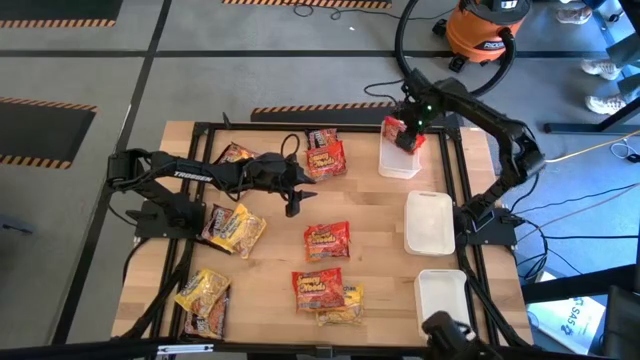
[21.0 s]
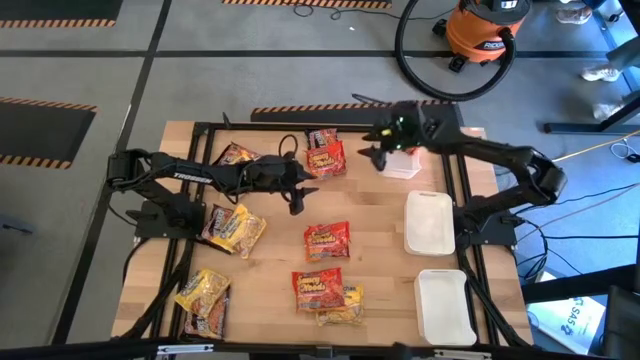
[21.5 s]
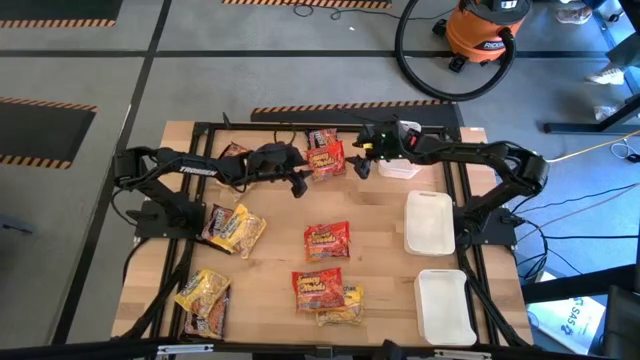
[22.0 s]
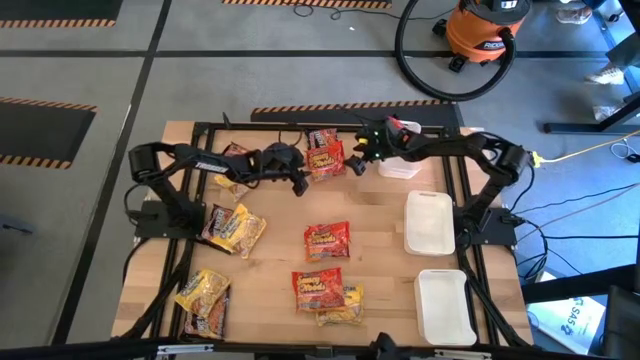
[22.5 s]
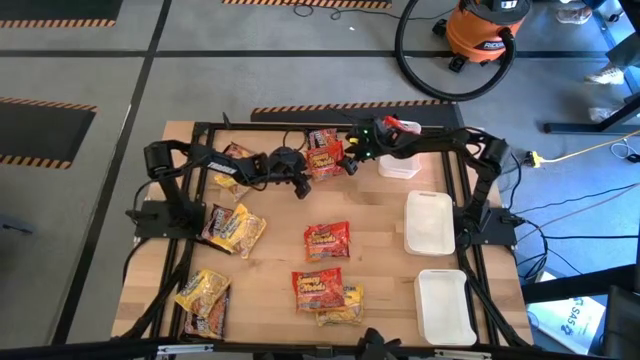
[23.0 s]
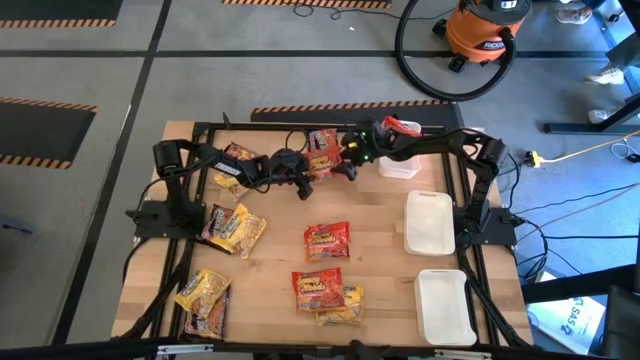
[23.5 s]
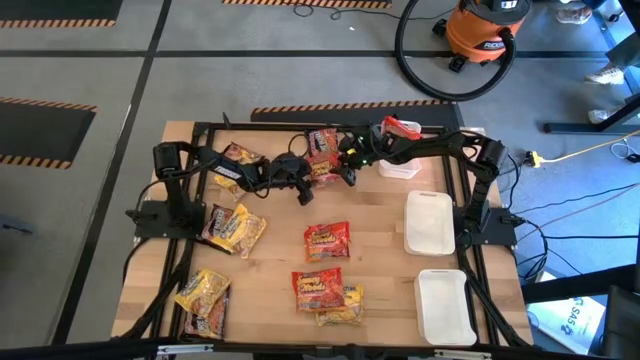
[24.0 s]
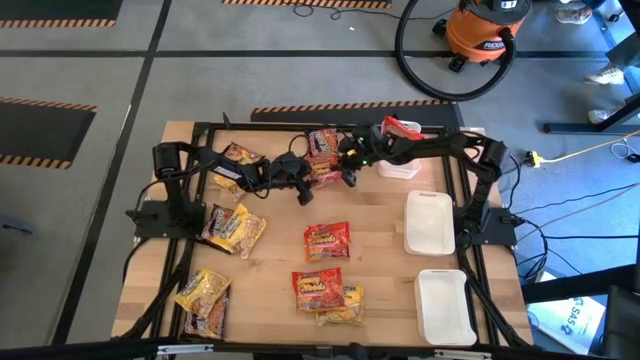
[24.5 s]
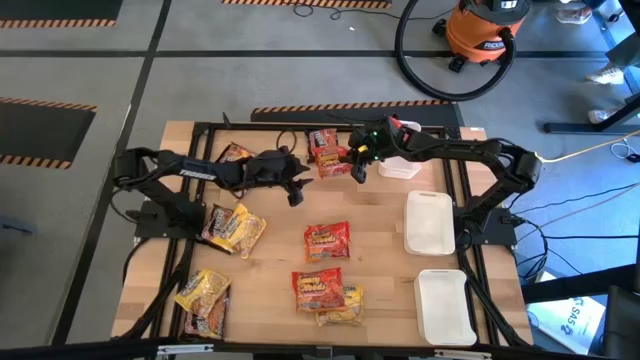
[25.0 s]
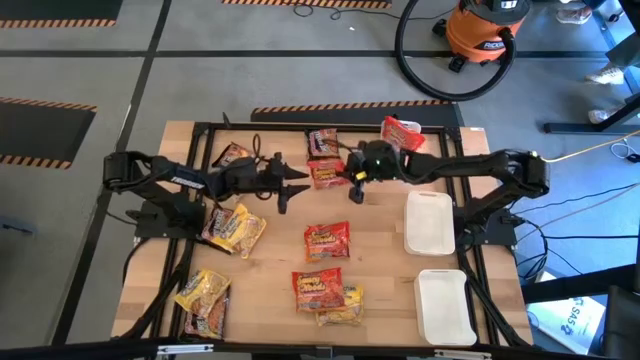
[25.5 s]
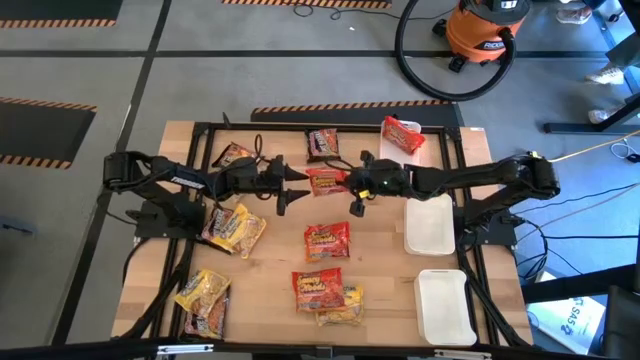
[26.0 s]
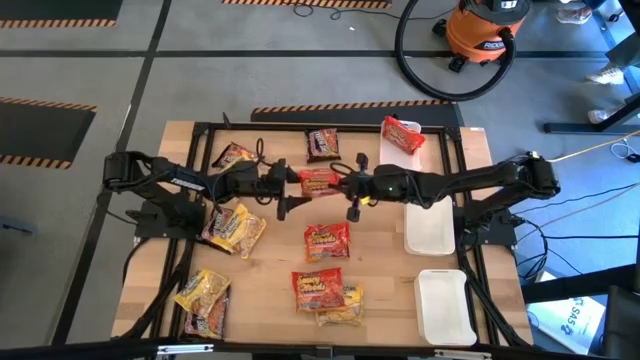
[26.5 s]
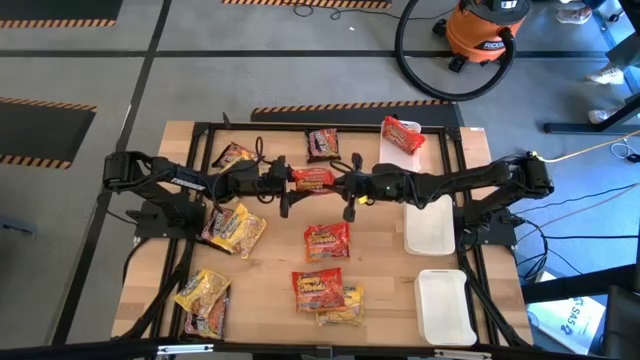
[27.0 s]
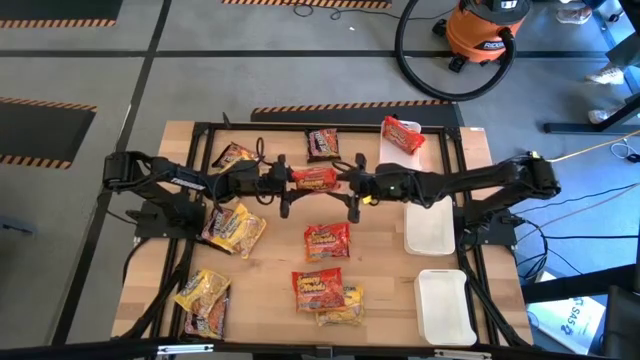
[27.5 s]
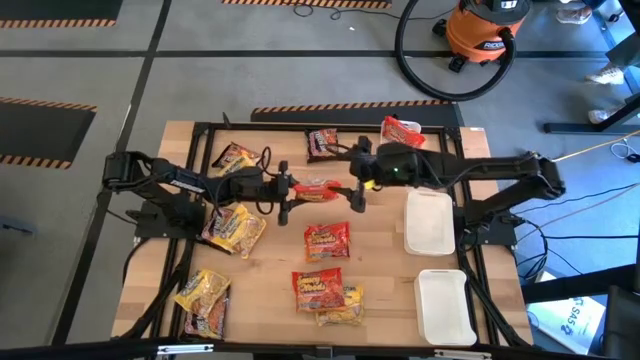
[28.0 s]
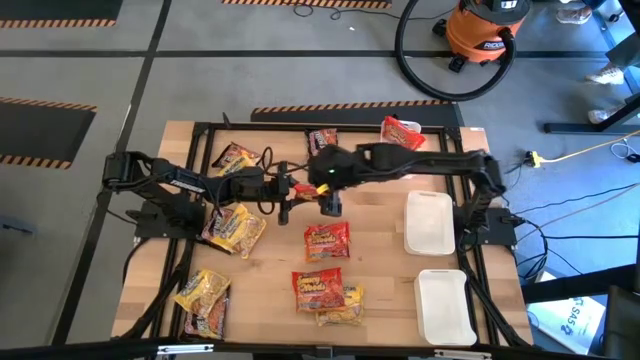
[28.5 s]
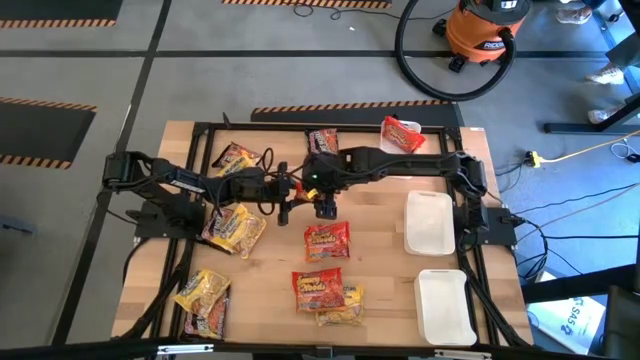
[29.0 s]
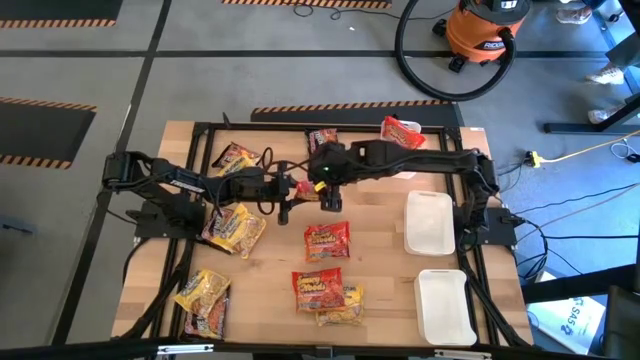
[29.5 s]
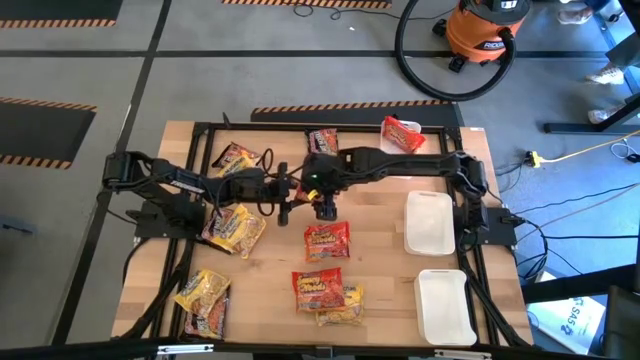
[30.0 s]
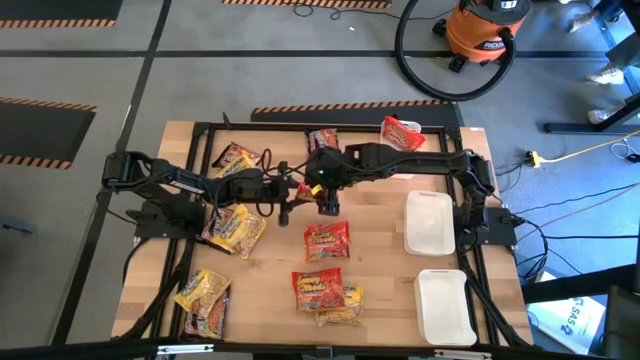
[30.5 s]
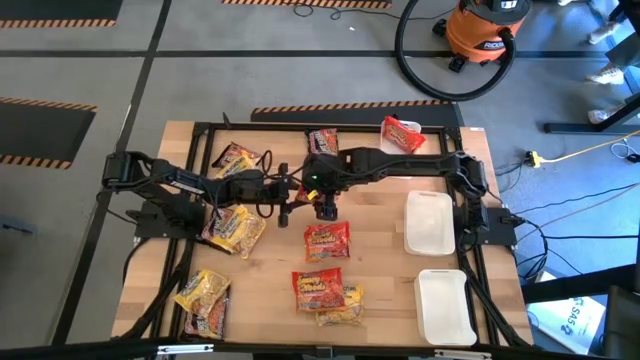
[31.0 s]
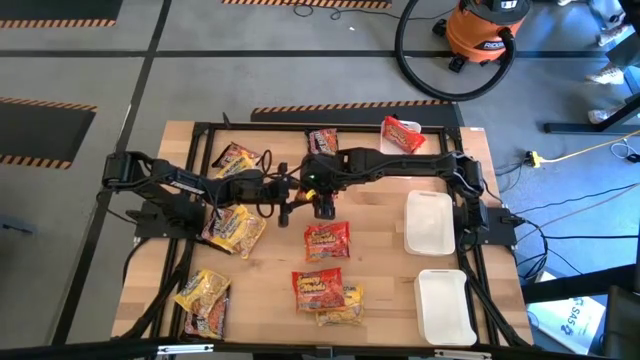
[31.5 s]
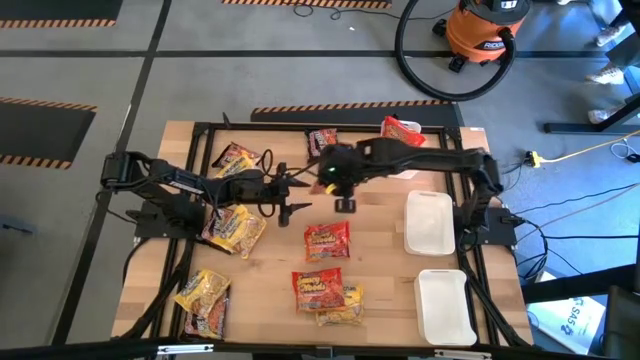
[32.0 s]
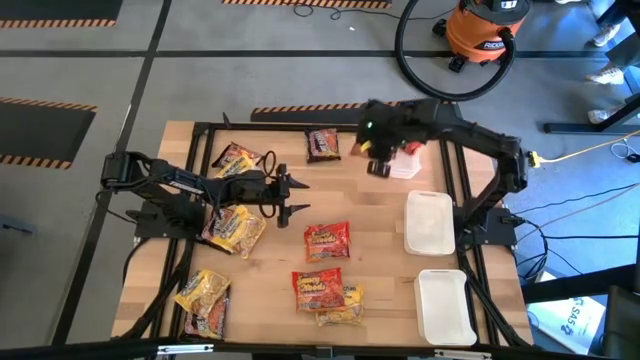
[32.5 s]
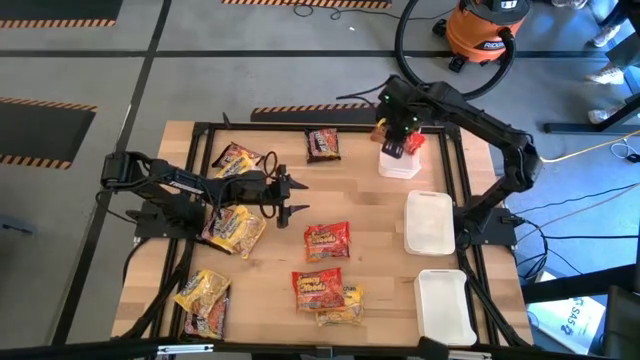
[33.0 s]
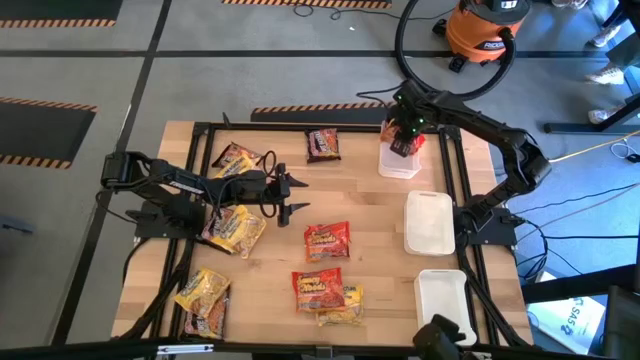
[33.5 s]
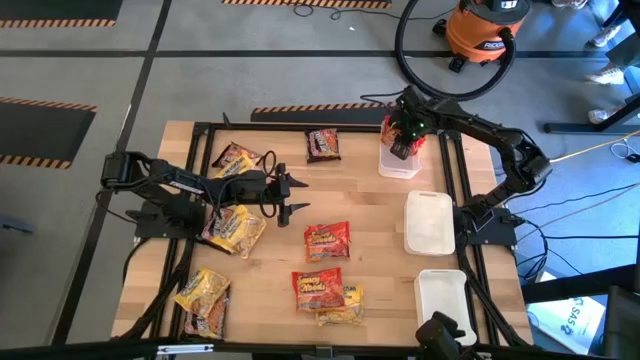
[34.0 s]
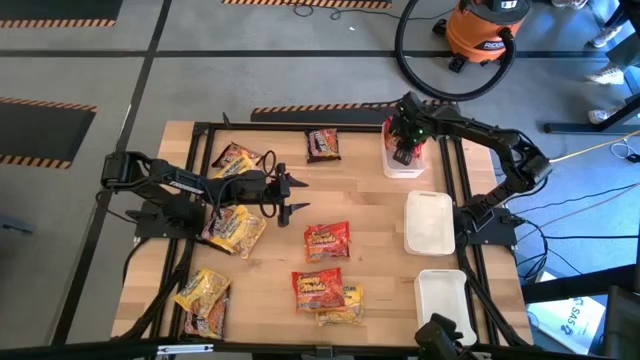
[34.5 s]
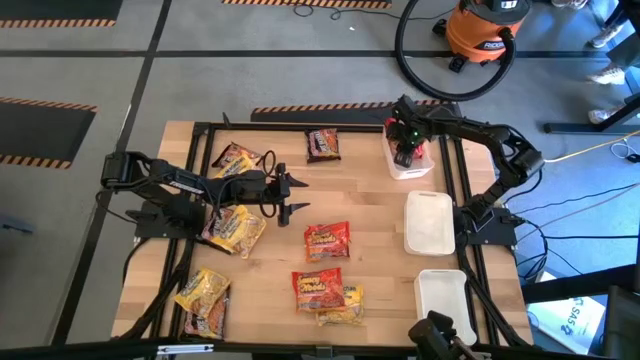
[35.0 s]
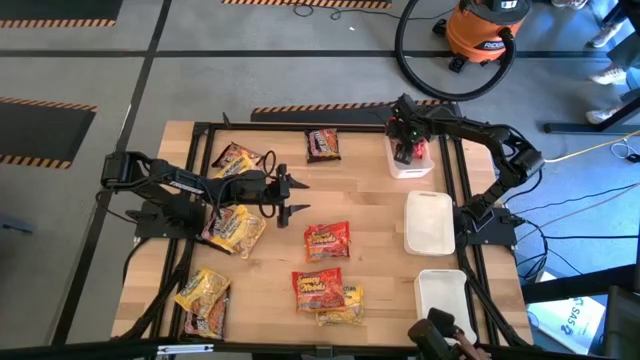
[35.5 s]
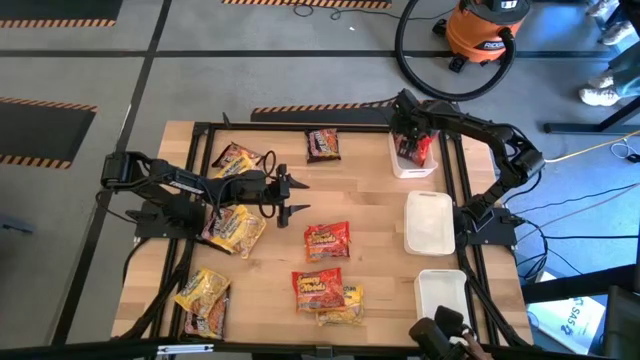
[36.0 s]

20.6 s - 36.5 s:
Task: Sort Maruchan noodles
Put the orange noodle pack into the top white bin

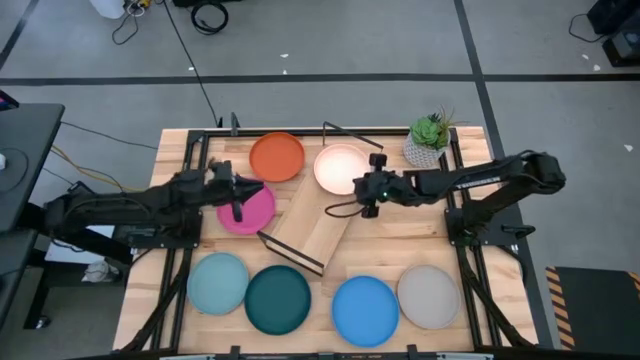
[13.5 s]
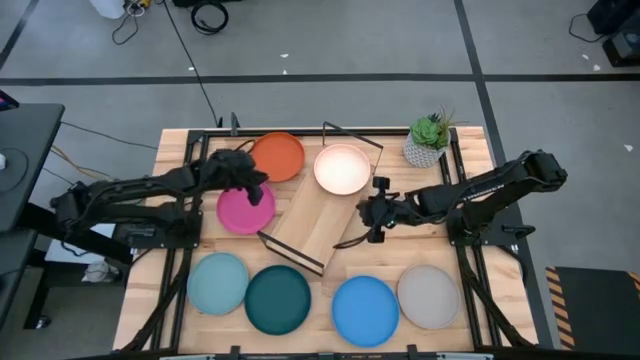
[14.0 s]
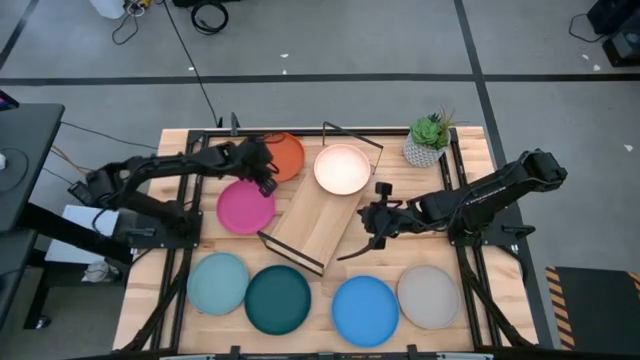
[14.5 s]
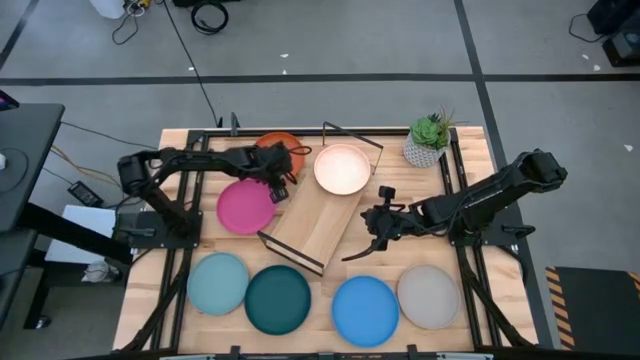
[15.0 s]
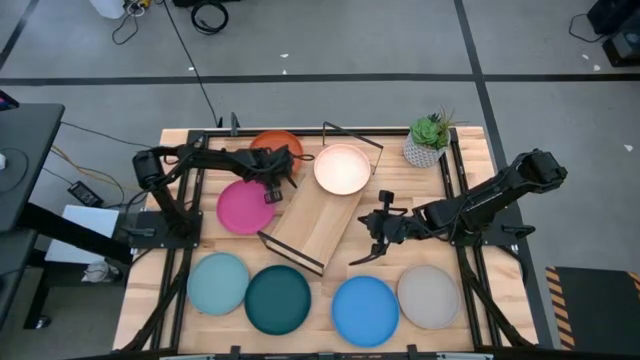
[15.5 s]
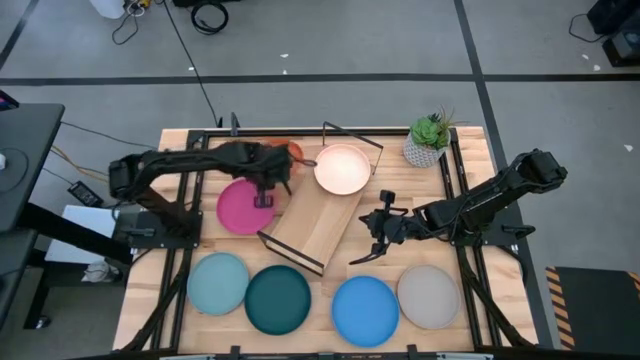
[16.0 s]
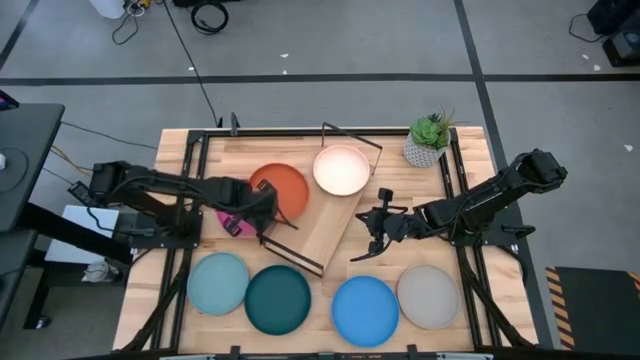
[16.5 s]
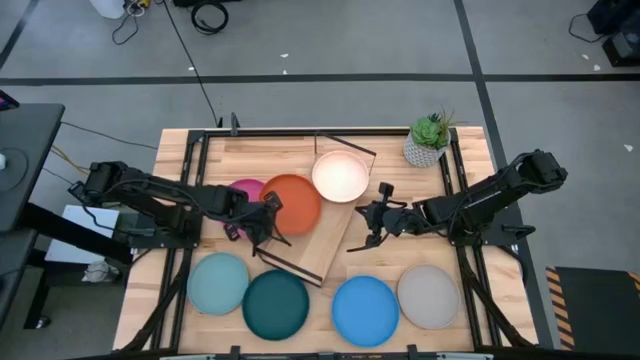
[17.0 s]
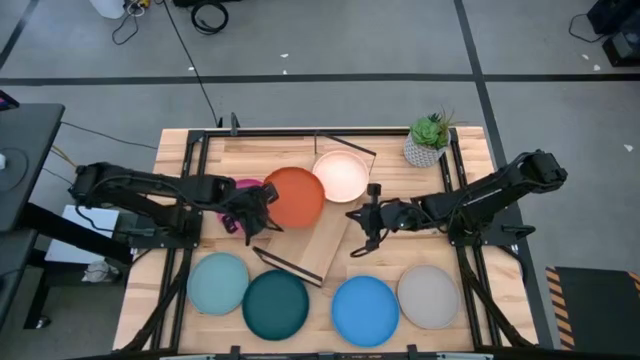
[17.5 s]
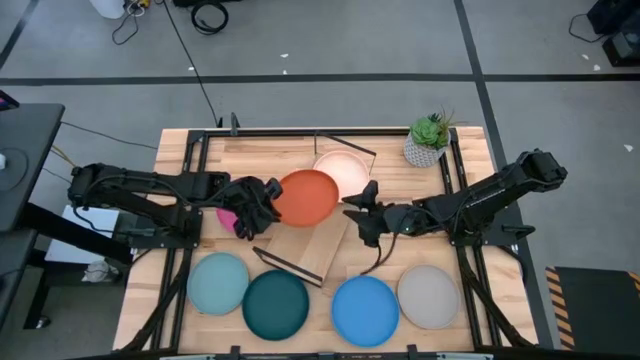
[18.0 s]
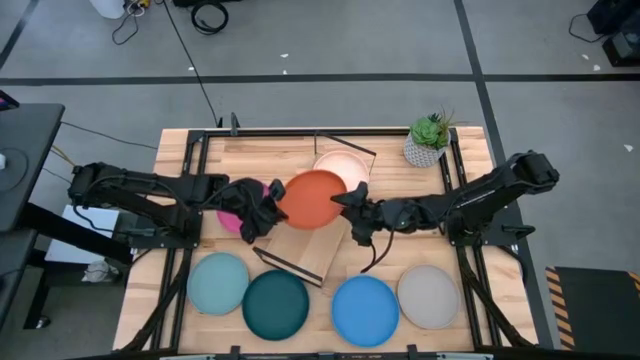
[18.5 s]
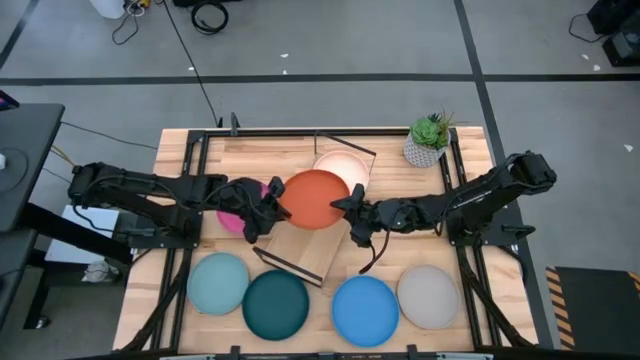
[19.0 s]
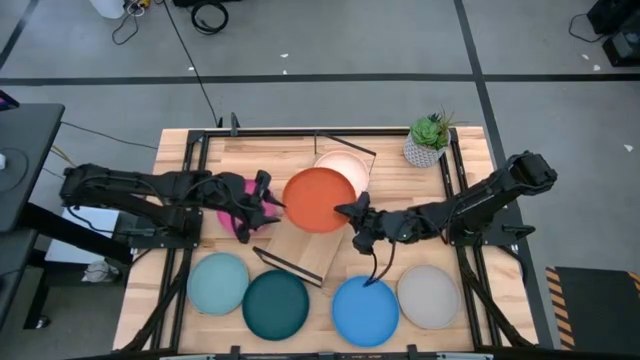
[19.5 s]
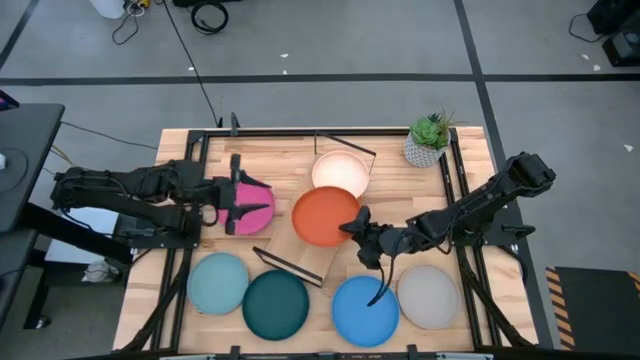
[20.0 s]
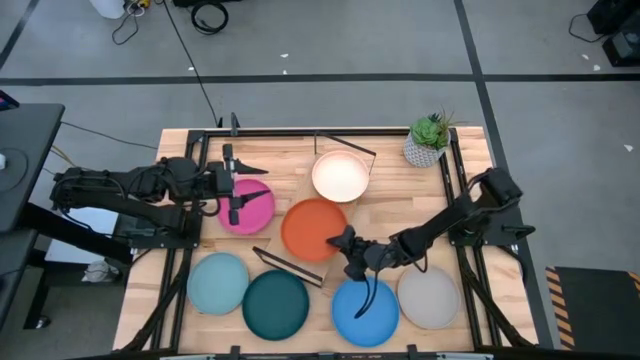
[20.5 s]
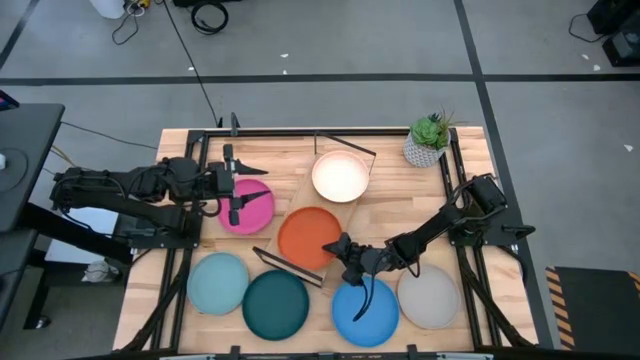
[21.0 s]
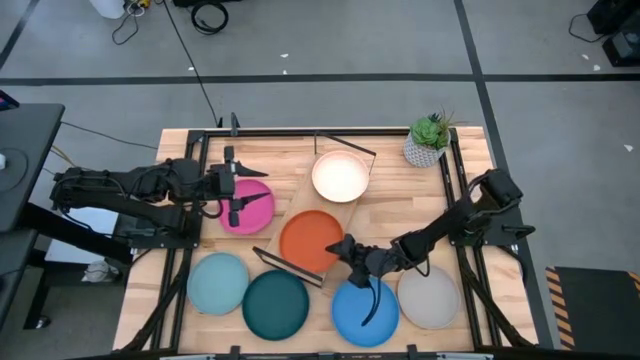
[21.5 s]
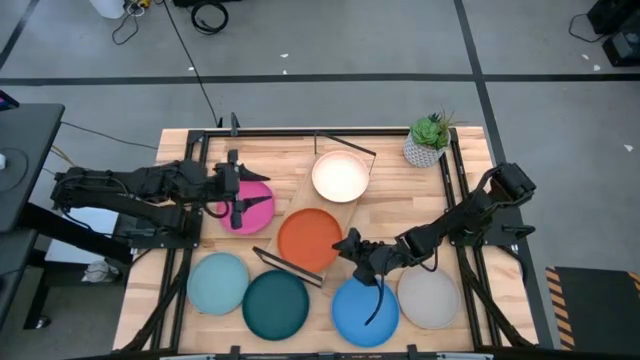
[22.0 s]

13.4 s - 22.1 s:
Task: Place and stack plates onto a shelf
Put the orange plate on the shelf
